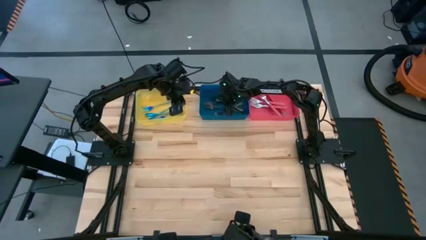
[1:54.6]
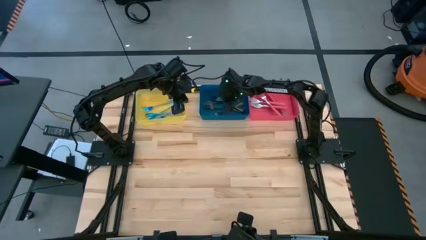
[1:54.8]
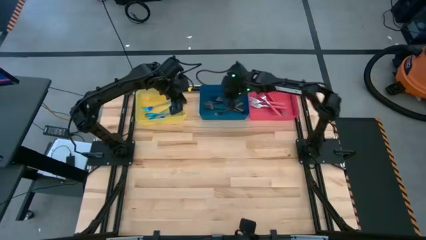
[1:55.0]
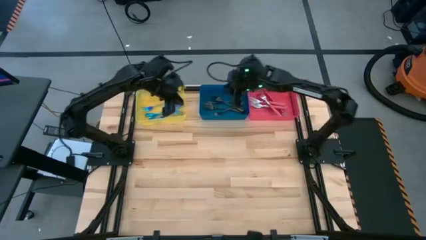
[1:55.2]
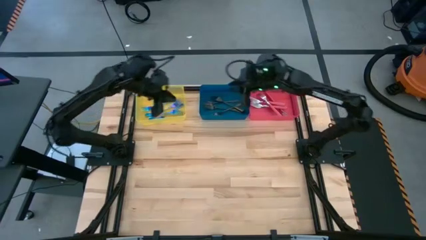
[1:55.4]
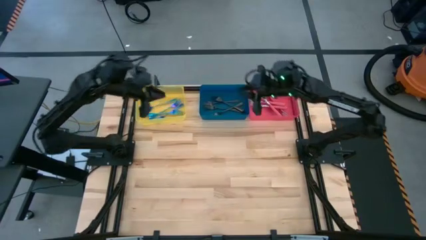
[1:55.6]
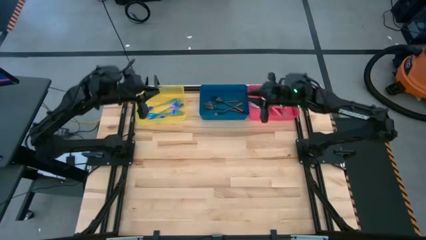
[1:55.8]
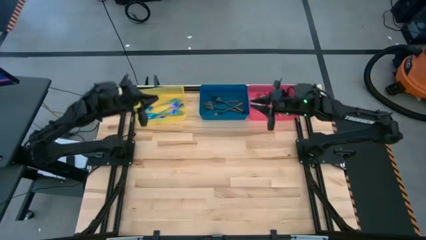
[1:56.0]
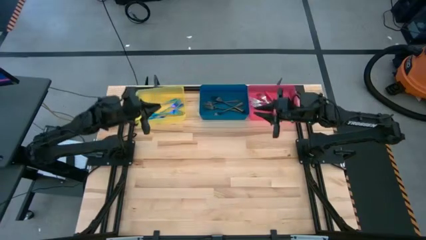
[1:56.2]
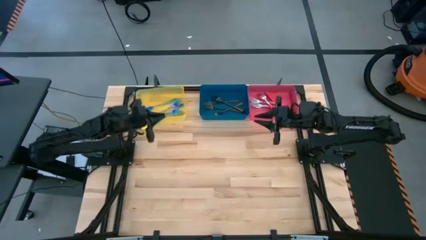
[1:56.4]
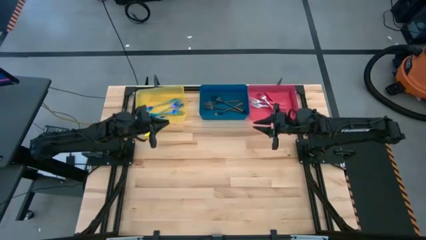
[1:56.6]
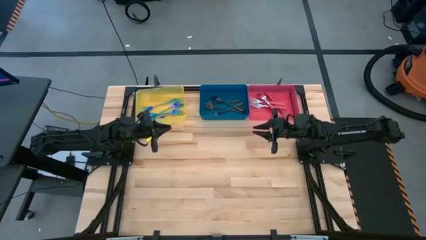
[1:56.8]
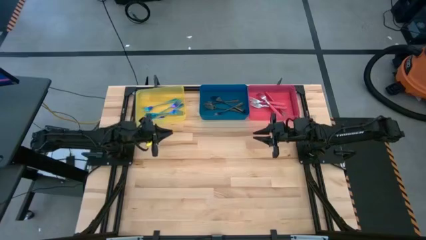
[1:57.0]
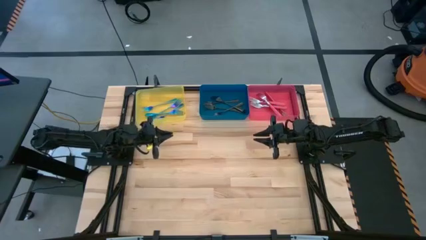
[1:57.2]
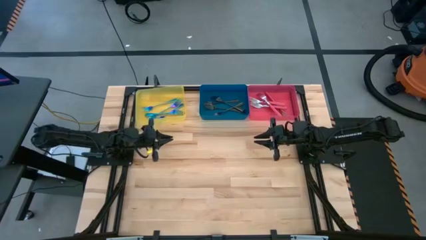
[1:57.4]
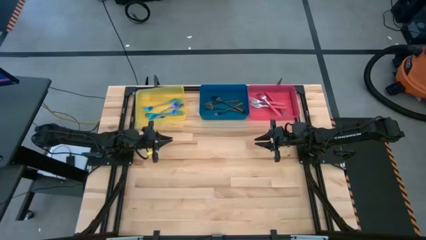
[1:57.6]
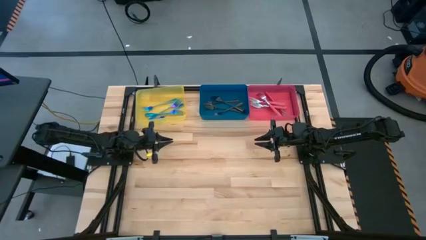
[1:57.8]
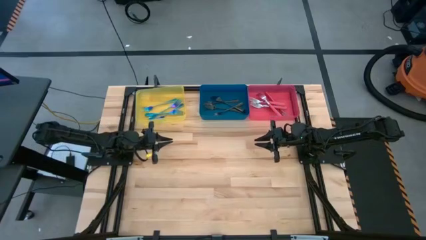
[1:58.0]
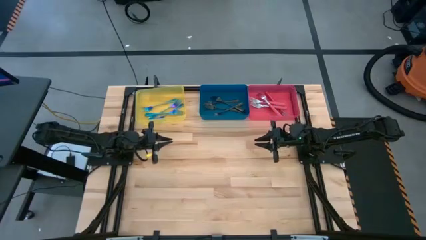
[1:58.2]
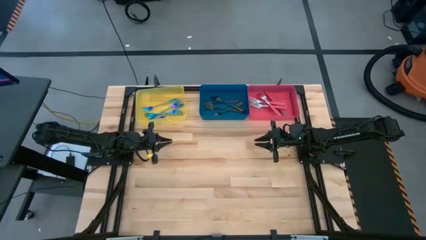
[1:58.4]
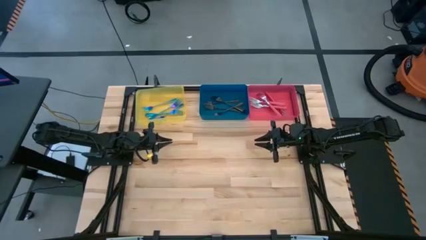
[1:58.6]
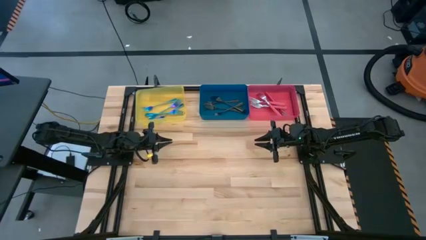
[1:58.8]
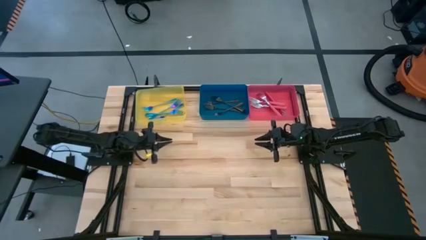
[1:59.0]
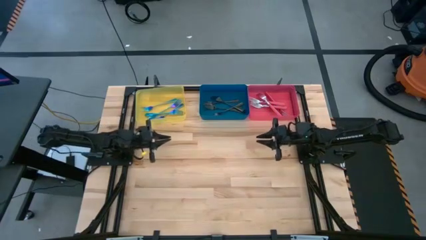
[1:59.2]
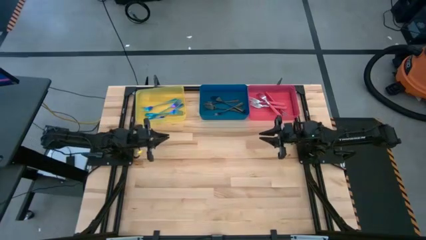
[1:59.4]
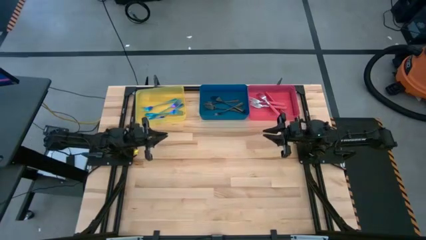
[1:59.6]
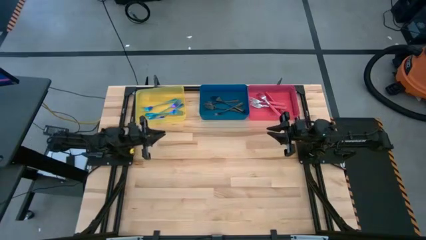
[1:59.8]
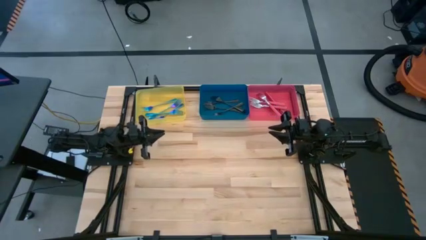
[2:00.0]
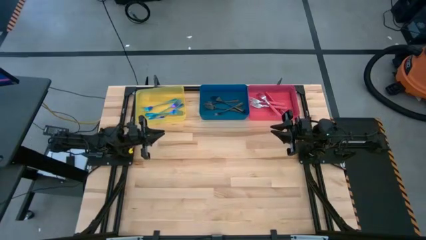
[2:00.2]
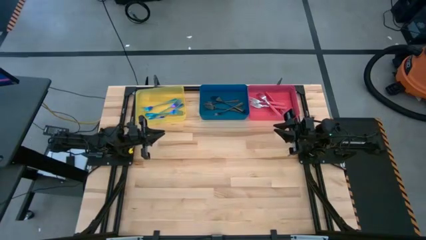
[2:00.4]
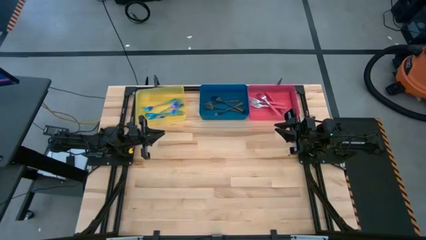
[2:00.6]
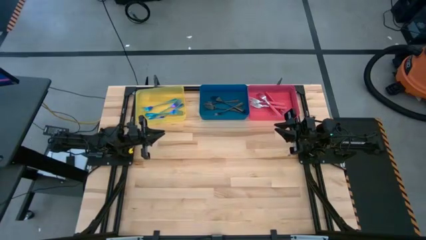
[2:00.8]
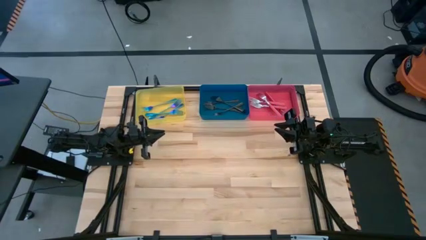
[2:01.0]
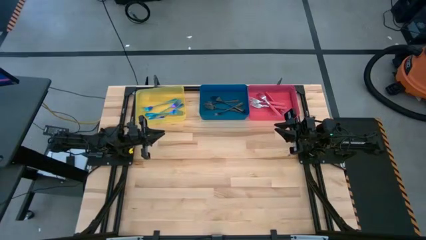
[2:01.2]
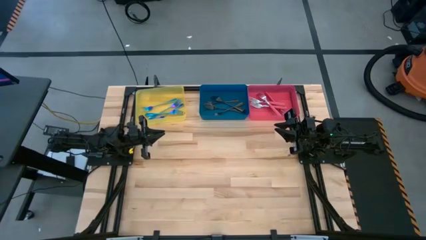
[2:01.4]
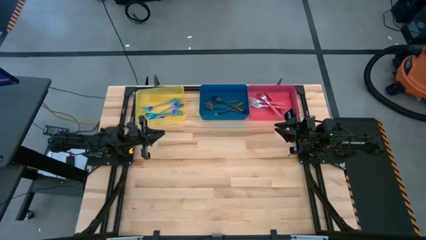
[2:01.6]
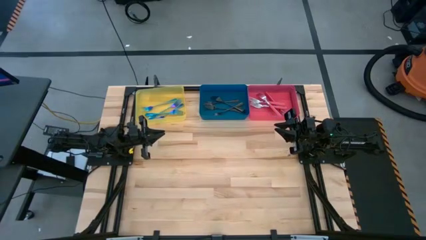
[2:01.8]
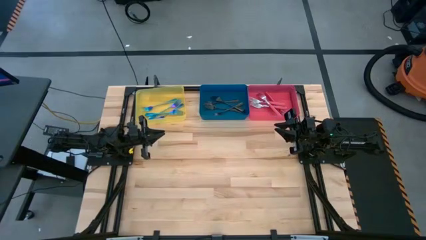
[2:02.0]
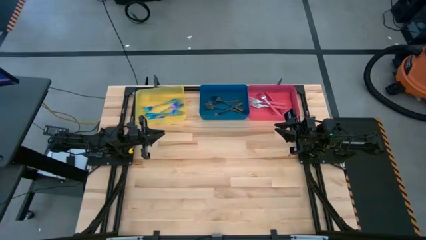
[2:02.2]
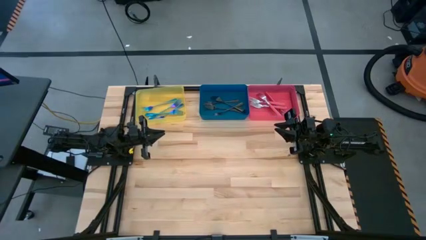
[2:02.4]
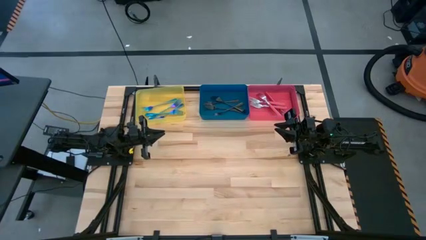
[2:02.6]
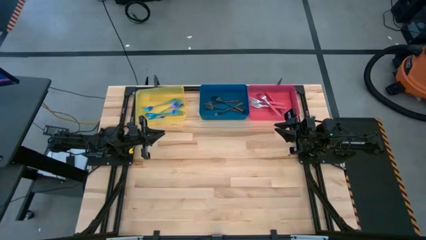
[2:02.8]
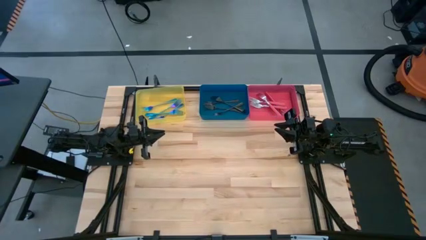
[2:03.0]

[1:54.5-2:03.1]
Task: Sort silverware by color (type)
Return to Home Position

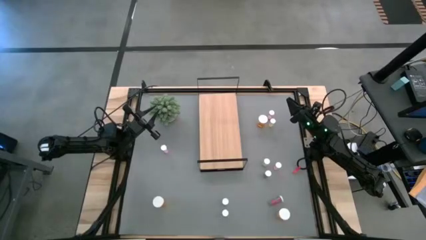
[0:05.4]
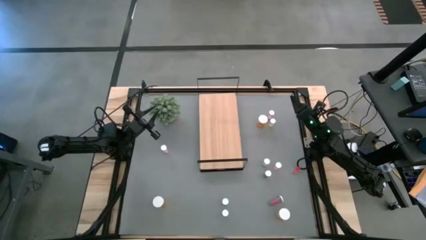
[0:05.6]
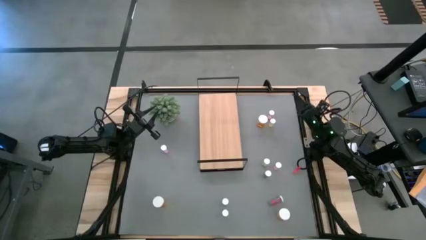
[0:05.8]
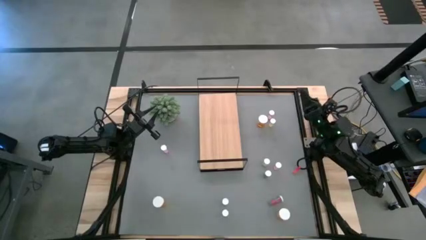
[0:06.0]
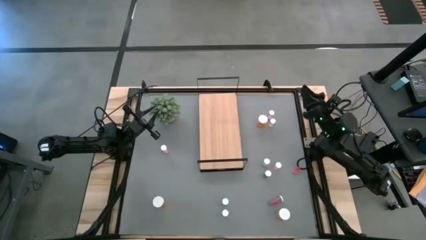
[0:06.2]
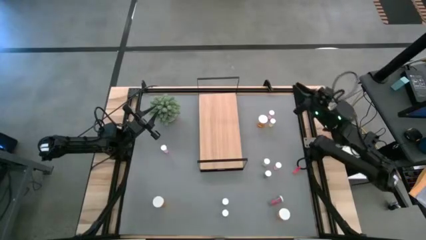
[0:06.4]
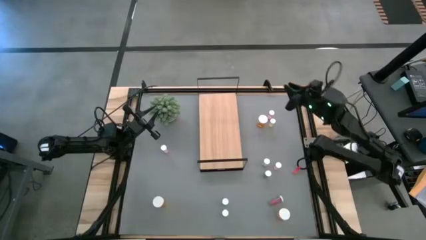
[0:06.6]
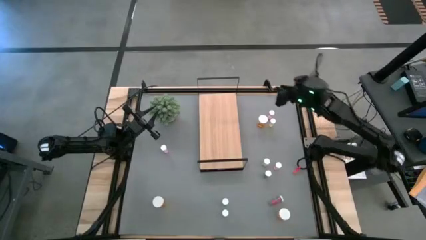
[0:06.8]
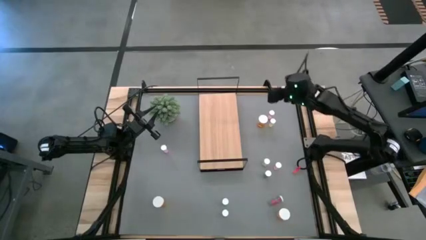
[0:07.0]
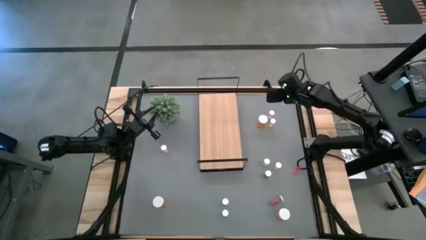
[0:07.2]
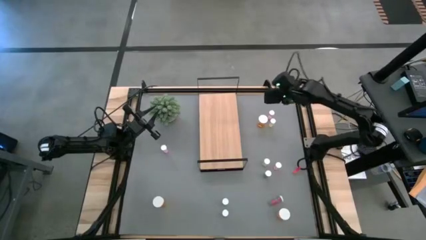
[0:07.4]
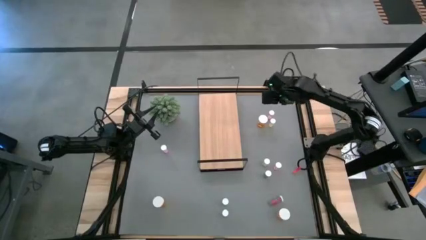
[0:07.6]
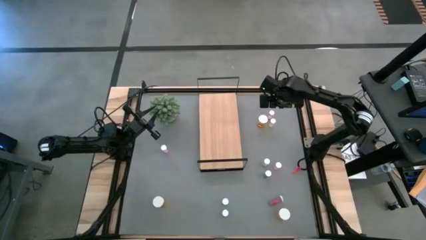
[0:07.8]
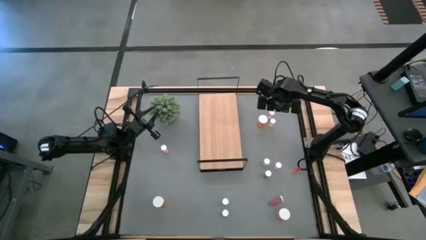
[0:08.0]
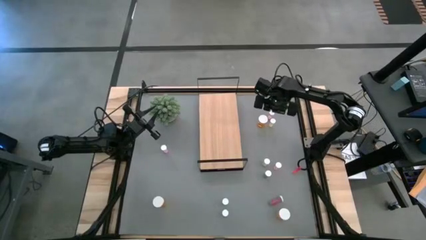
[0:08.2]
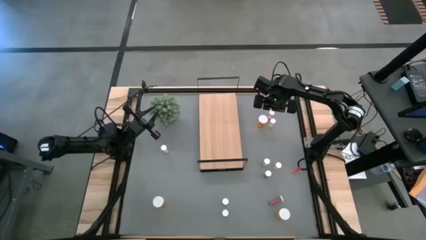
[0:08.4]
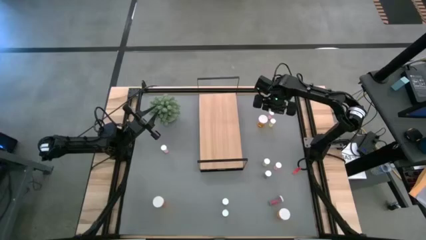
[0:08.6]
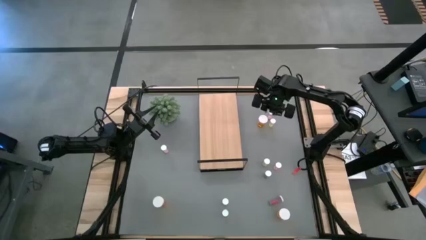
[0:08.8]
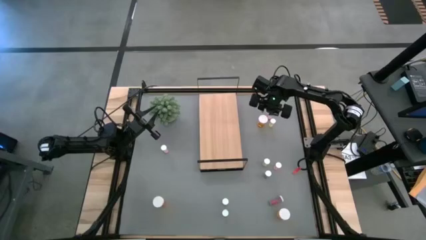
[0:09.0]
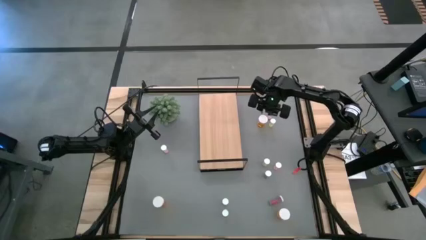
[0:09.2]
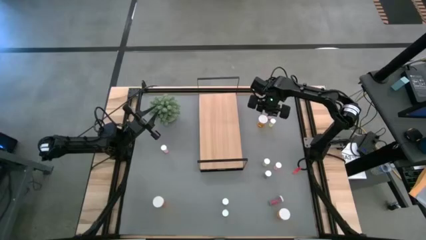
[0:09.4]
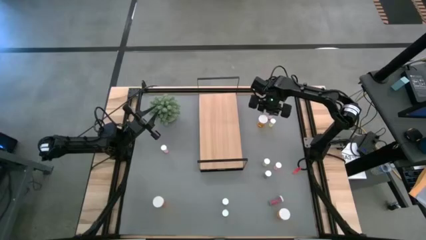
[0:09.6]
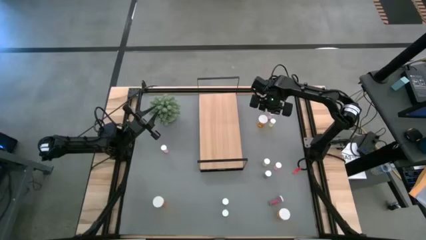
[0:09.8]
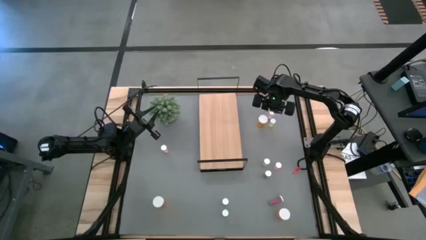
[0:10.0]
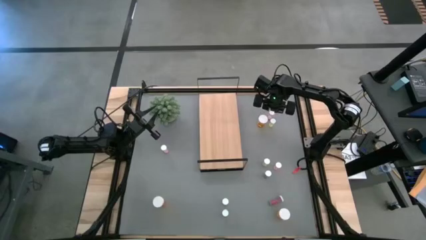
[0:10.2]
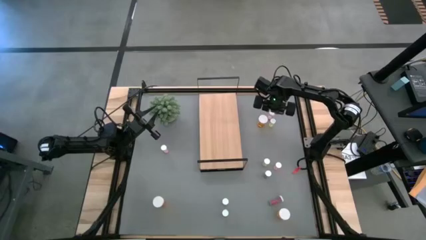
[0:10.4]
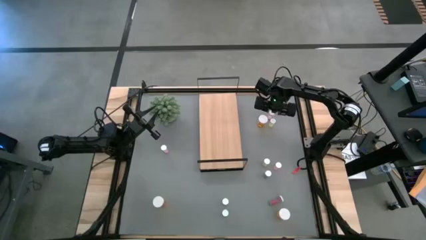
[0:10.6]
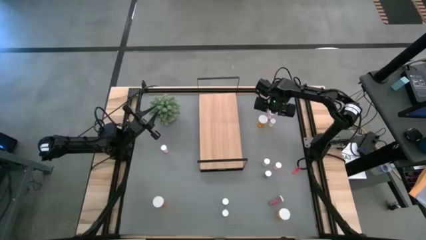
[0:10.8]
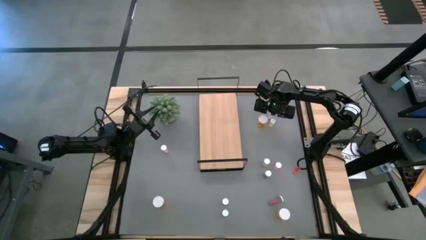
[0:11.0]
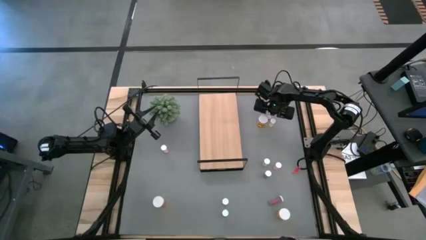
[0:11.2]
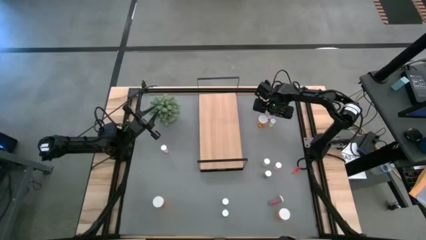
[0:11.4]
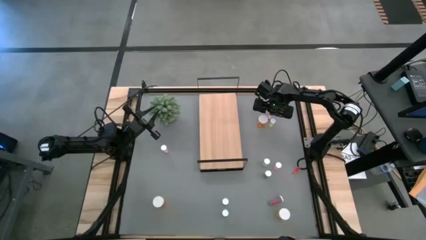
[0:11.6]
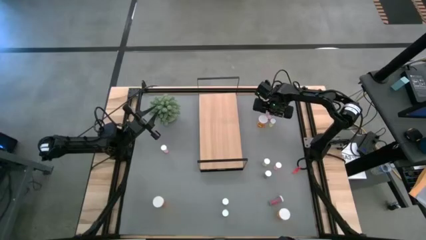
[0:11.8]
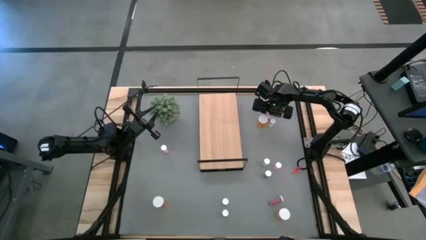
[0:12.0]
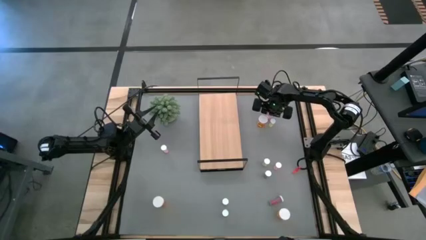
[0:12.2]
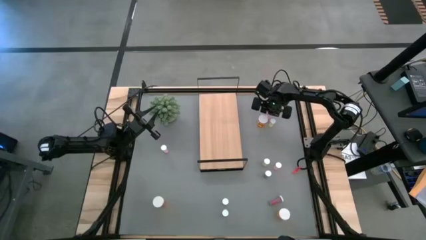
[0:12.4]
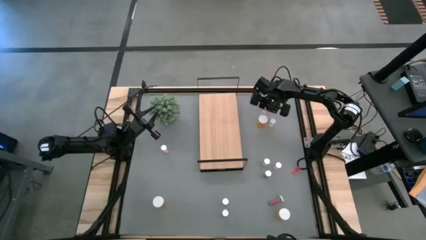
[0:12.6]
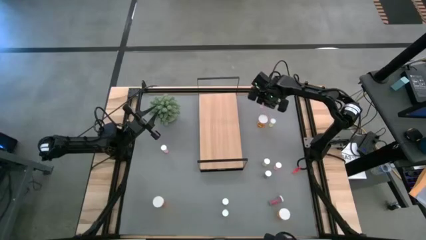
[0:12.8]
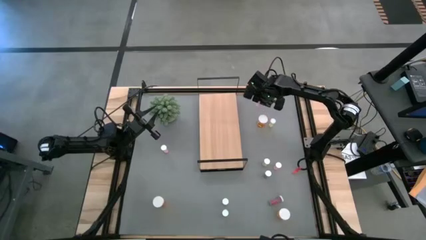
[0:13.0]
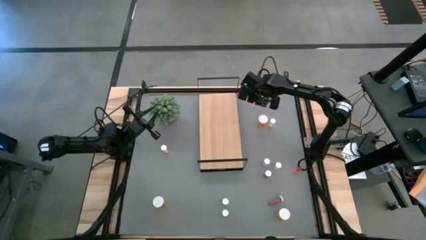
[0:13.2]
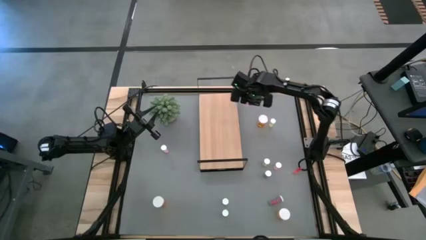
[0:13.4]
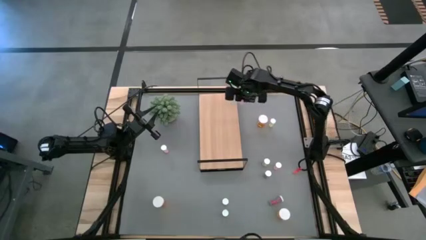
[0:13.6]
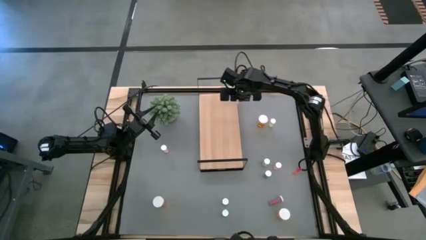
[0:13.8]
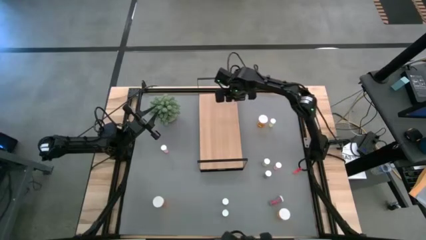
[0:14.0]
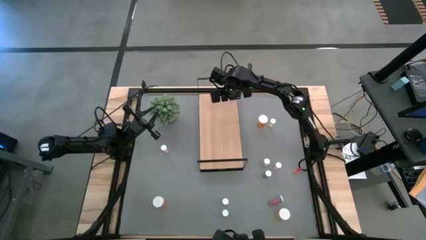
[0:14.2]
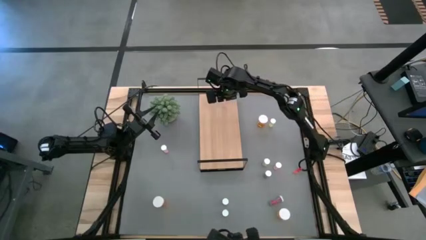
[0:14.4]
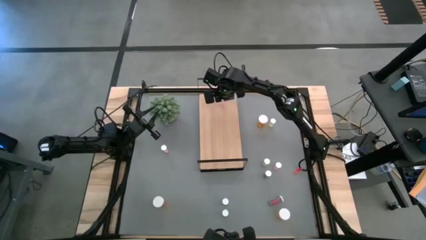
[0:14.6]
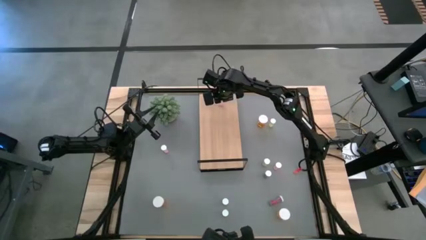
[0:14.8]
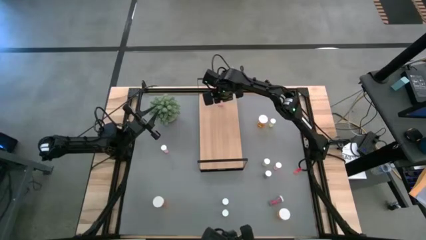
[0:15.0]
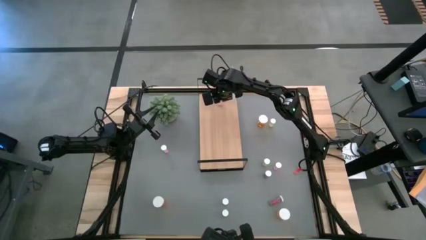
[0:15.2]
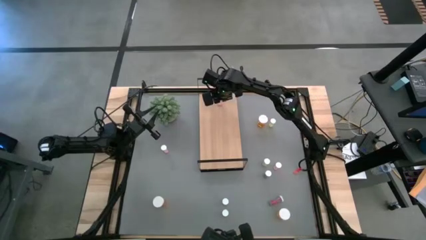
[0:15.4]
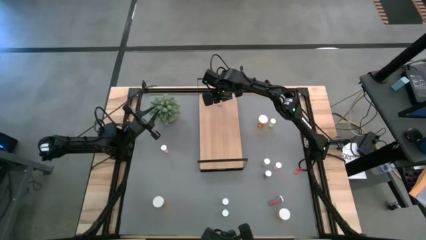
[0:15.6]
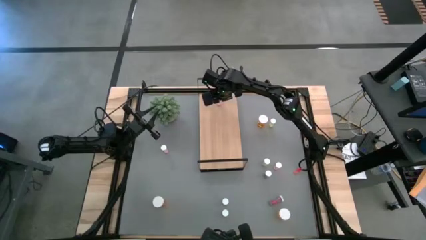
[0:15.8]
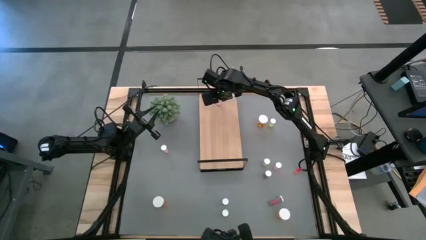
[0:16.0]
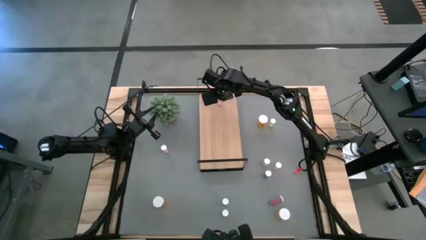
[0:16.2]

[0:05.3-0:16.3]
Task: Pick and place medicine bottles onto shelf by color
Put the top pink pill bottle on the shelf
